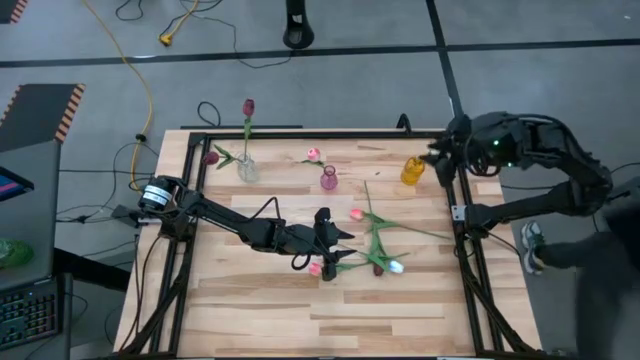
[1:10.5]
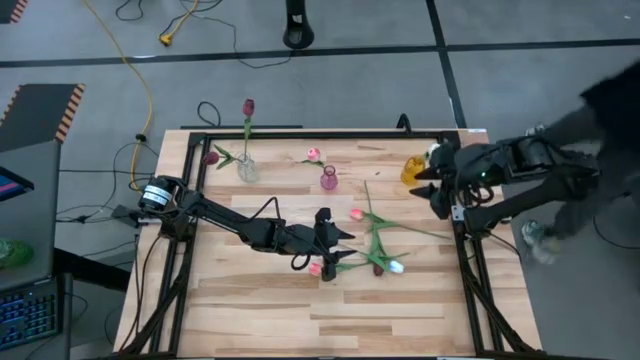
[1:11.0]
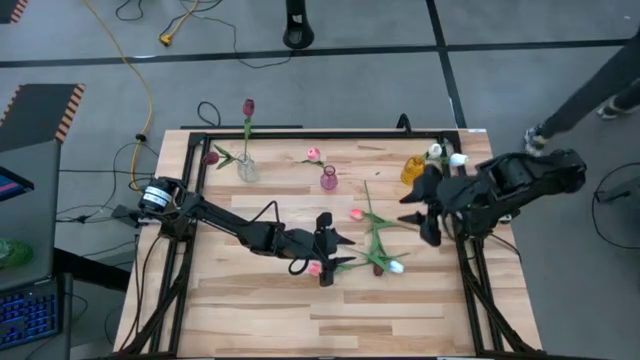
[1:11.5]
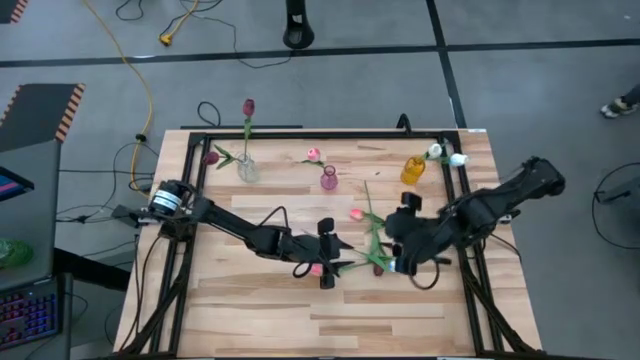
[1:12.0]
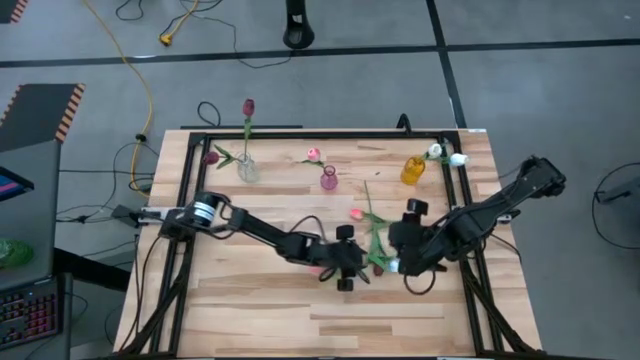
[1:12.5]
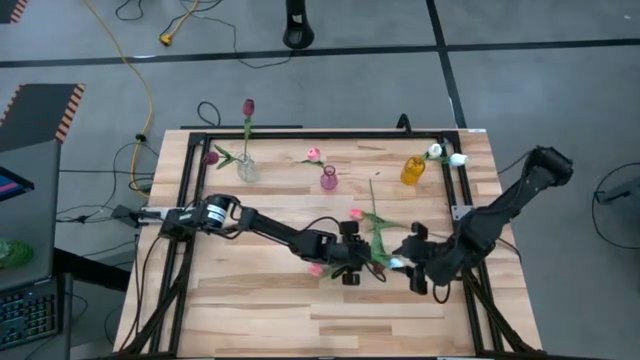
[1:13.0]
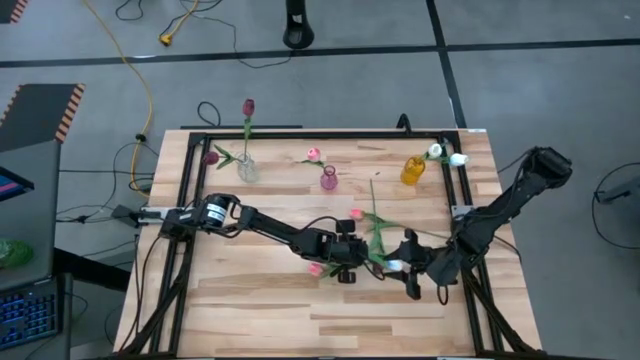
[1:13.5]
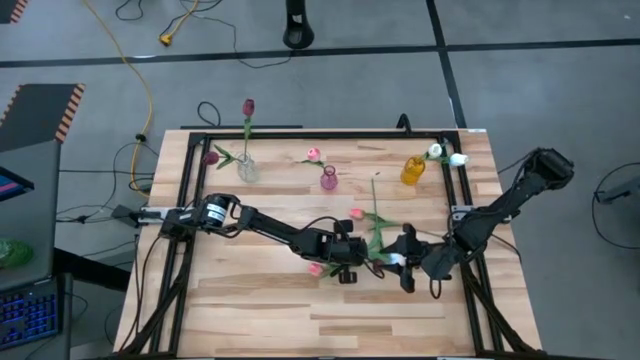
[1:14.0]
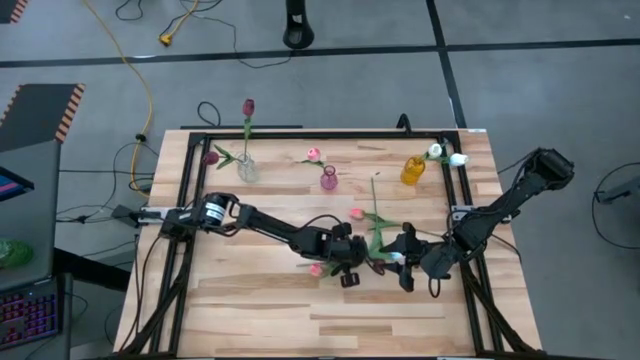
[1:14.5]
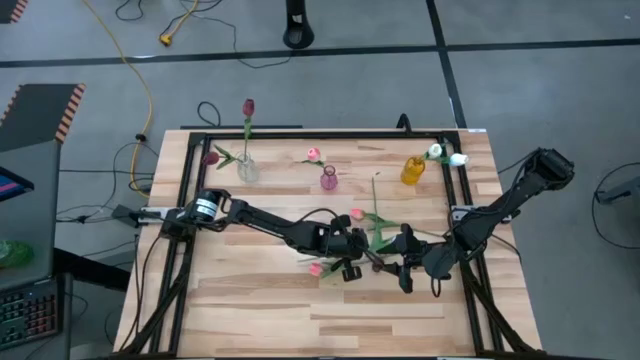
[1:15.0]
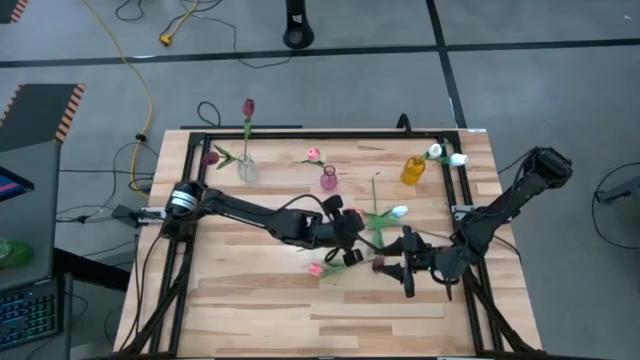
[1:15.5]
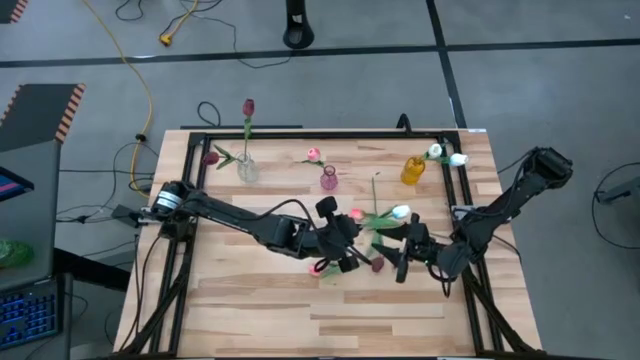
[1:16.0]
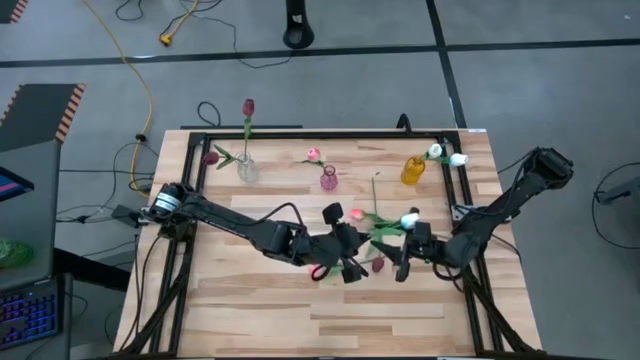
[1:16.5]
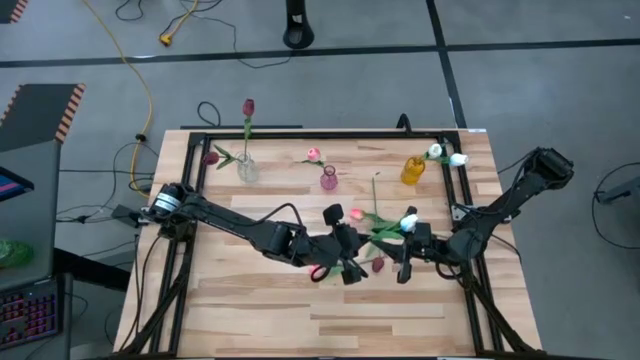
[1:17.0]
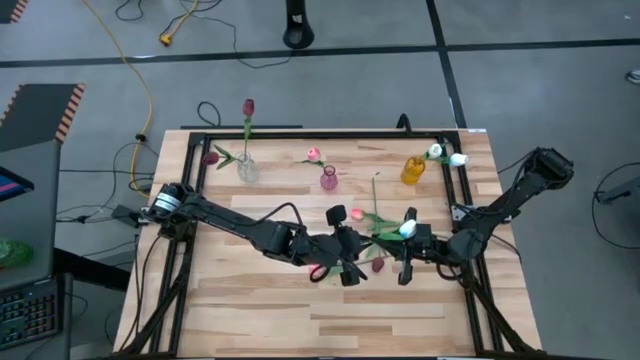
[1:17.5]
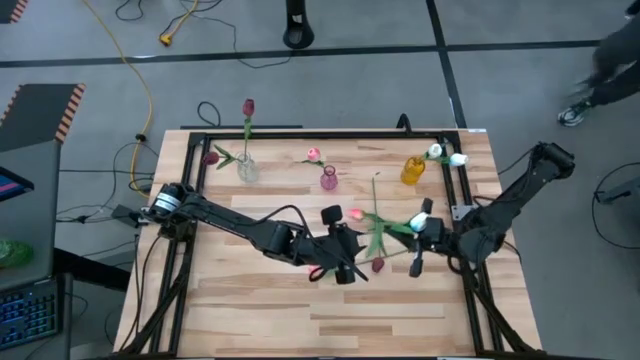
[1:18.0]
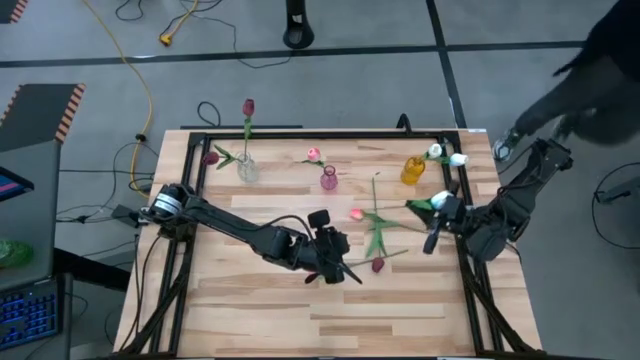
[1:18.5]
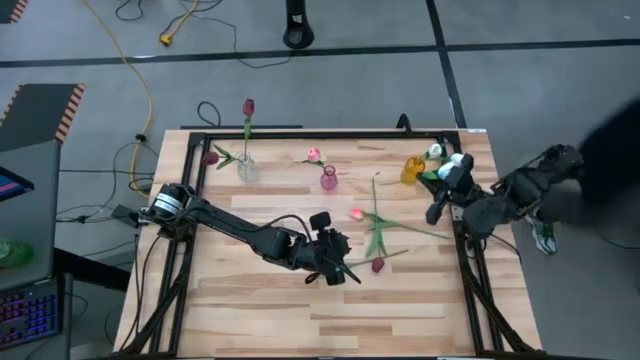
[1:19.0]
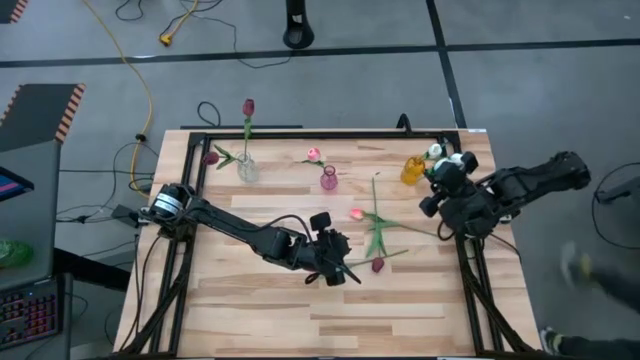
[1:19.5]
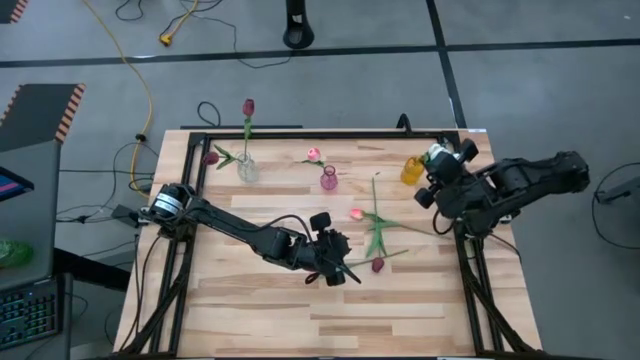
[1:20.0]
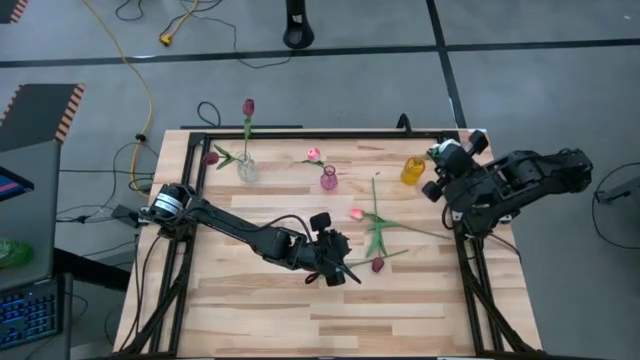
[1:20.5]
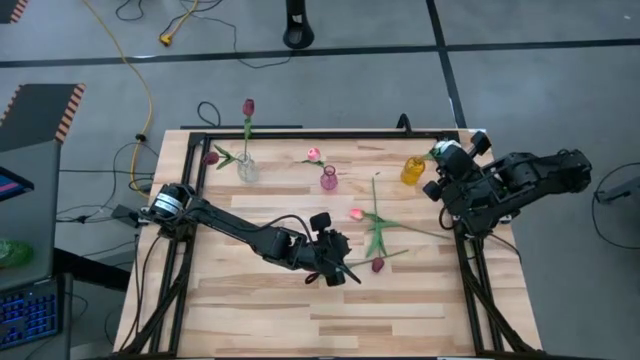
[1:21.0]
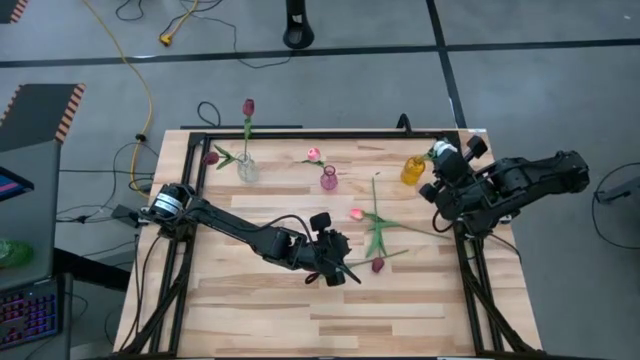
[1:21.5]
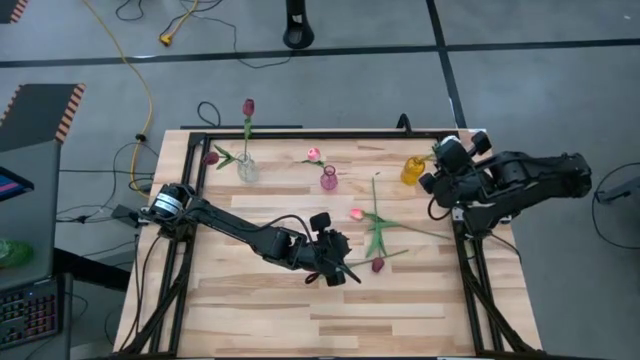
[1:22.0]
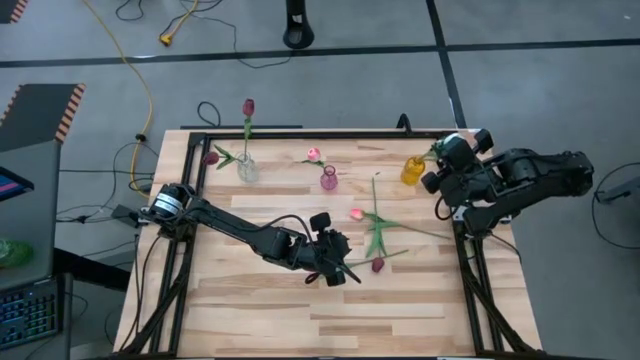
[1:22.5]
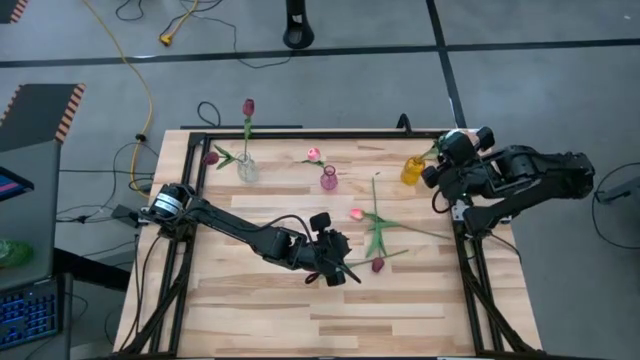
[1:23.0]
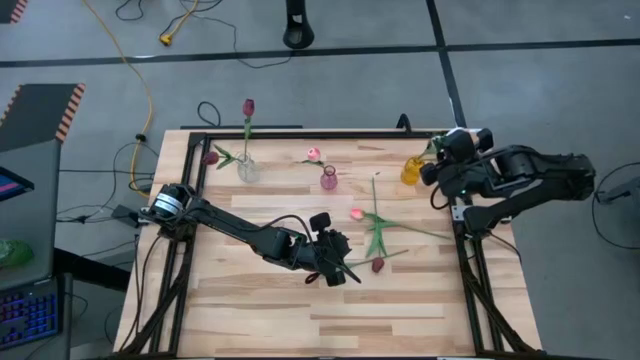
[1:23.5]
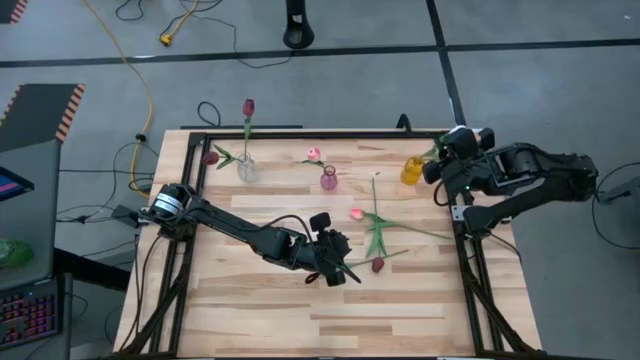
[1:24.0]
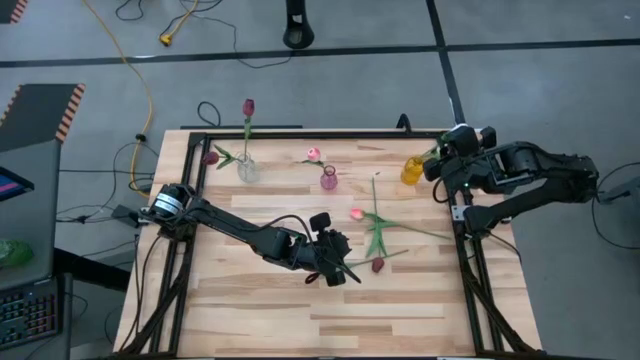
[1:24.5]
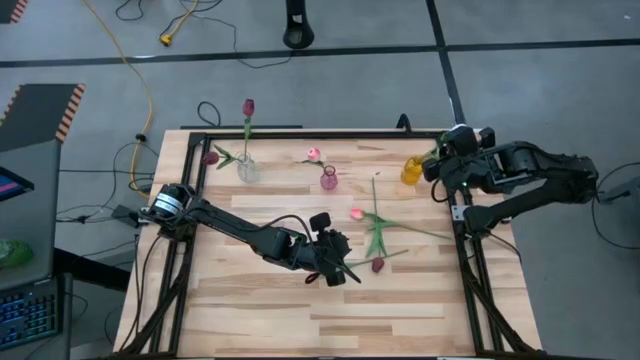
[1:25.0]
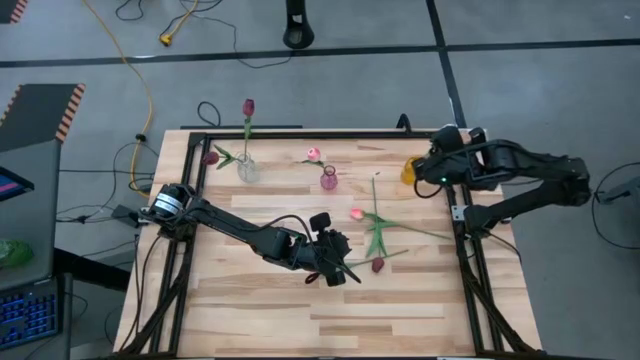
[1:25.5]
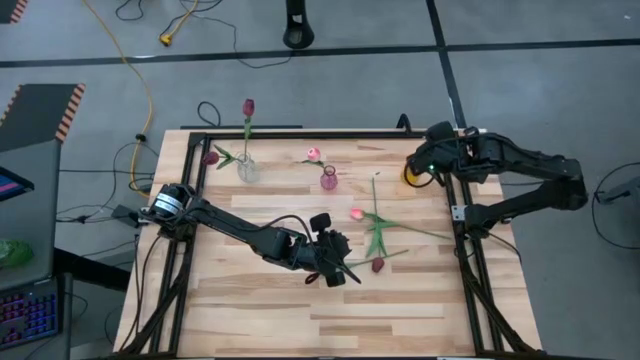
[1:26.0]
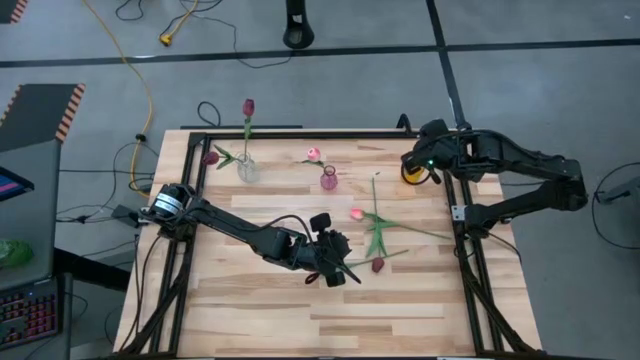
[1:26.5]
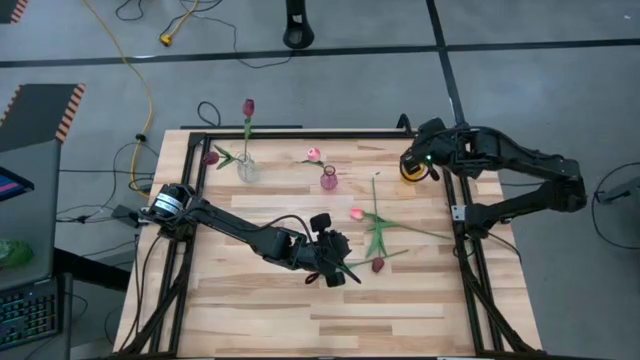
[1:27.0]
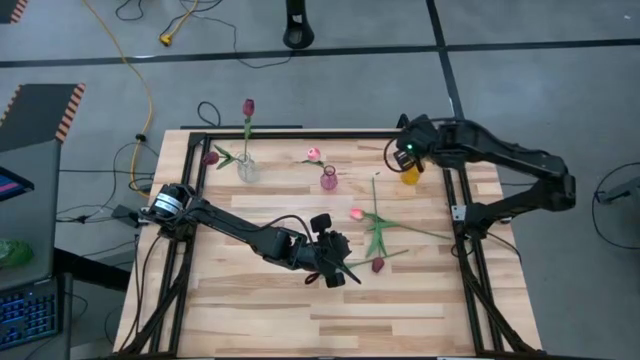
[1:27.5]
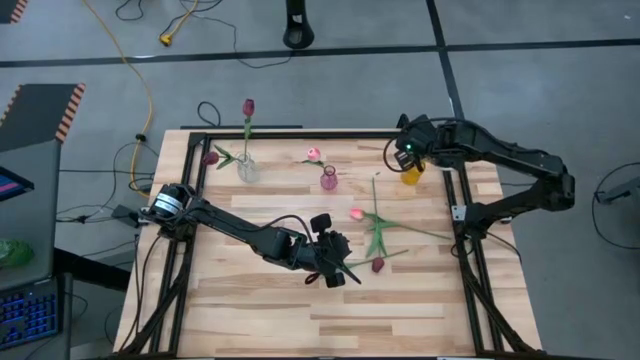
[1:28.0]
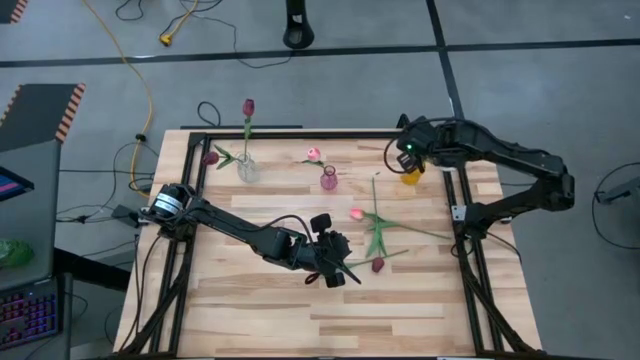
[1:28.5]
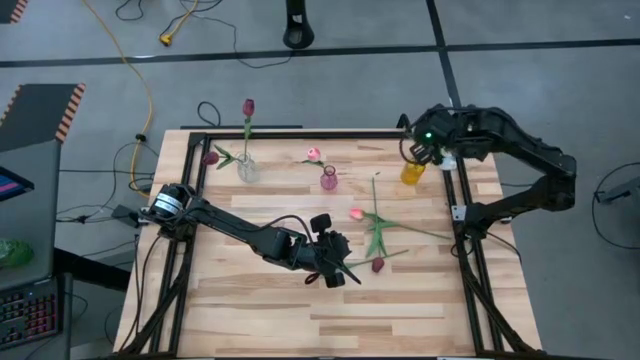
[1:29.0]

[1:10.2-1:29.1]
Task: Sort flowers into vase by color
Put the white flower into the yellow vase

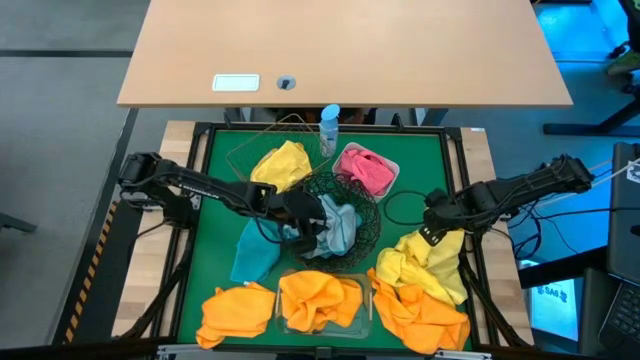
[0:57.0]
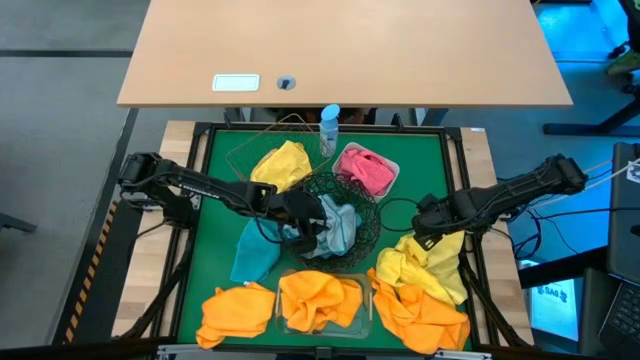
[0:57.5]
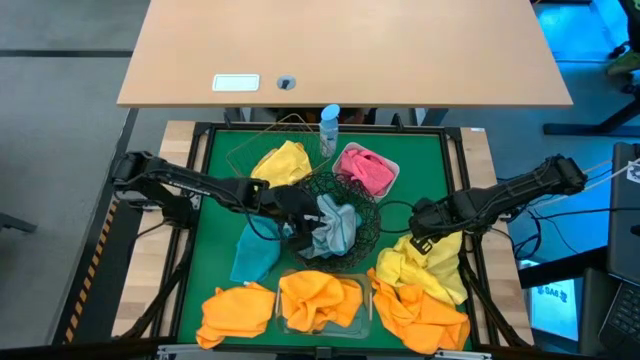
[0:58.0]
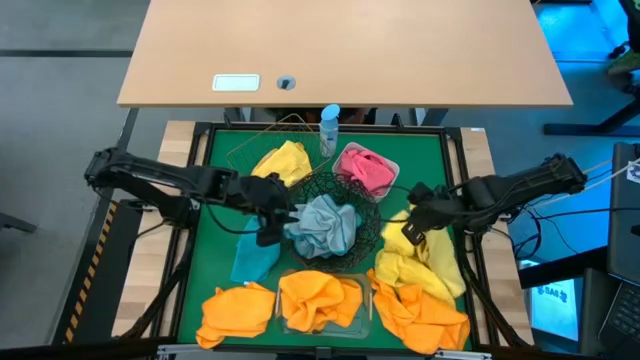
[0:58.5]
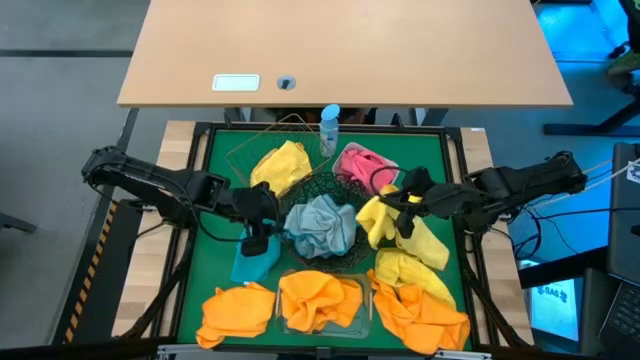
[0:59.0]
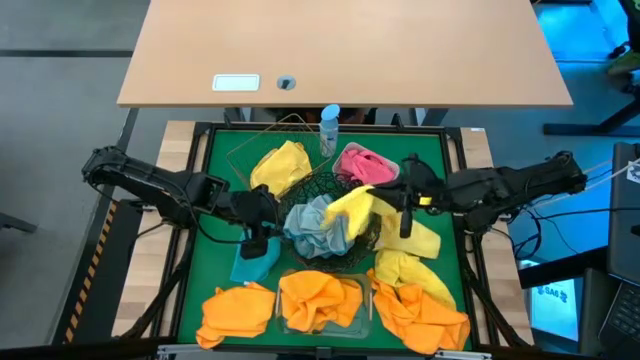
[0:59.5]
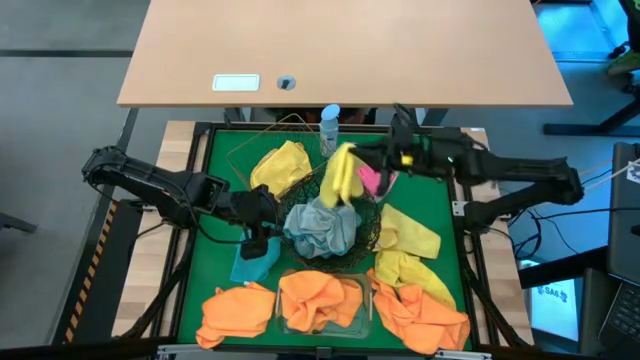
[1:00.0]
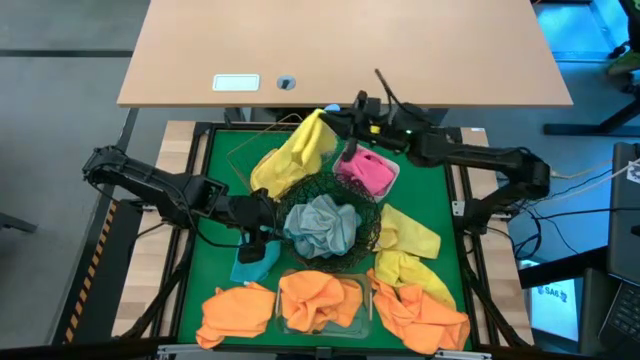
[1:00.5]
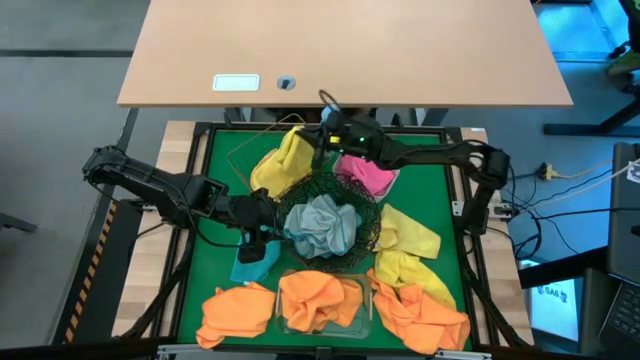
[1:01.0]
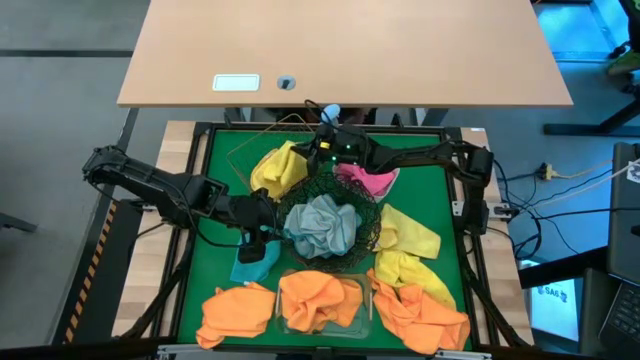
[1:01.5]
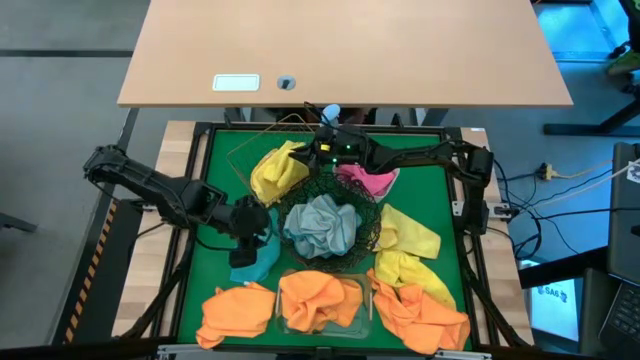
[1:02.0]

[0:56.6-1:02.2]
Task: Sort microfiber towel by color & place in baskets
Put the yellow microfiber towel into the brown wire basket
